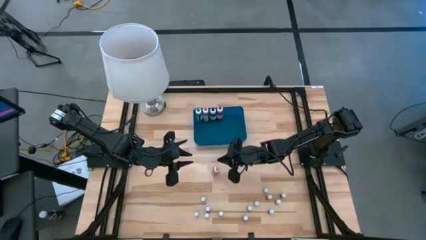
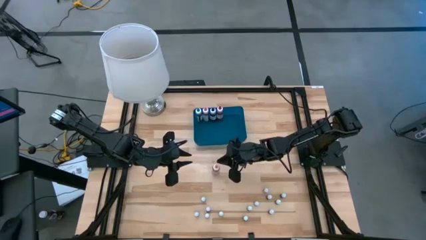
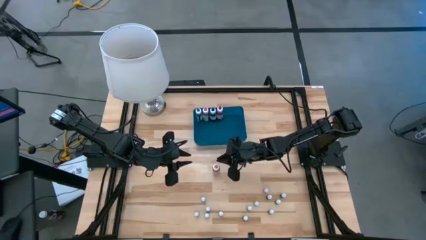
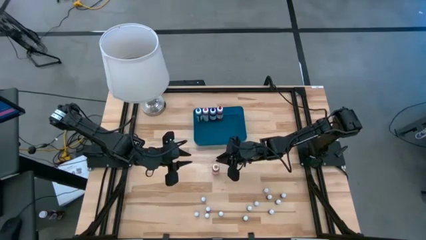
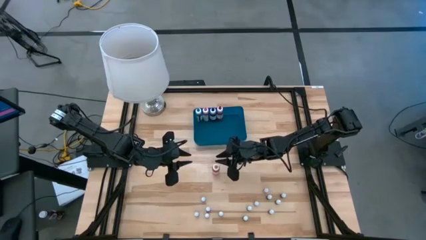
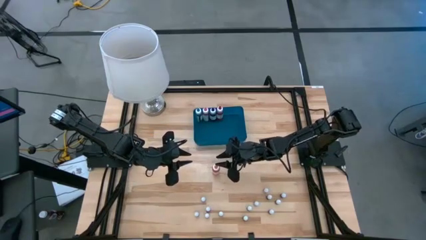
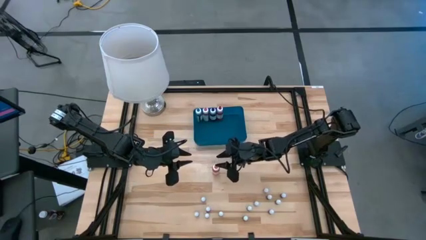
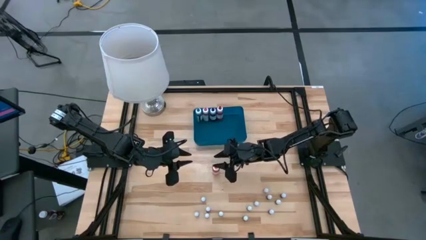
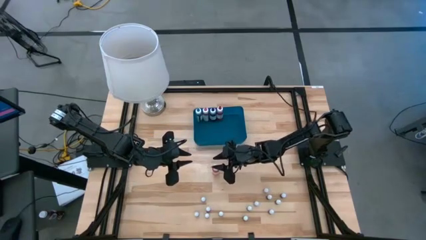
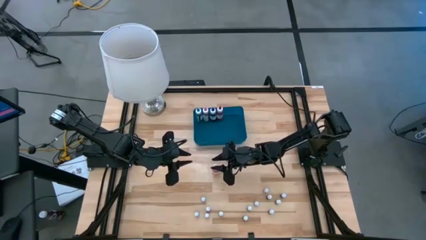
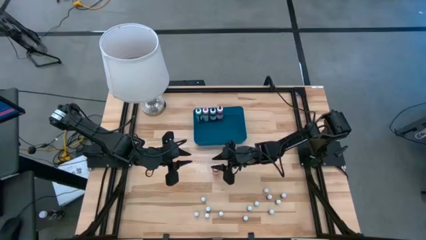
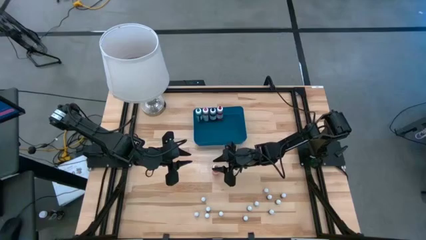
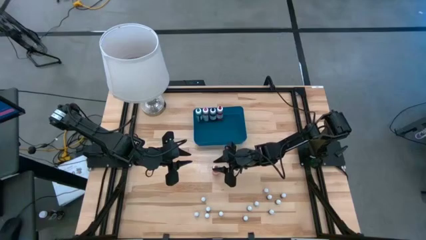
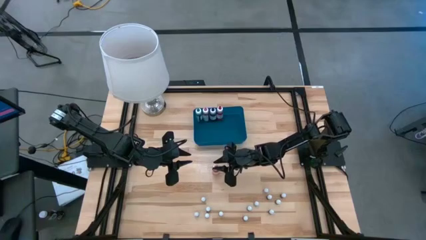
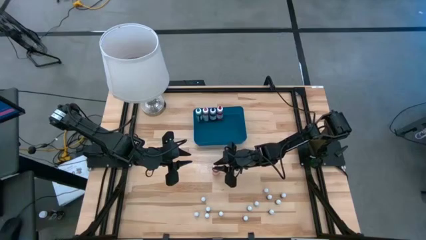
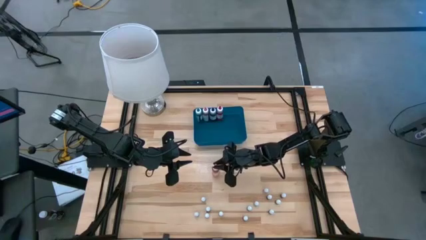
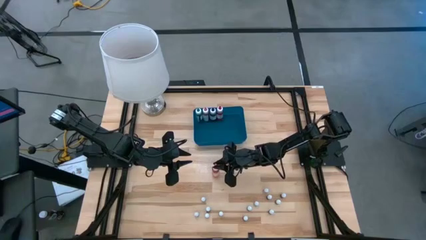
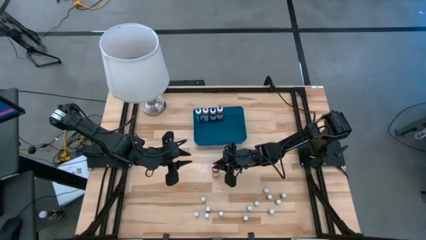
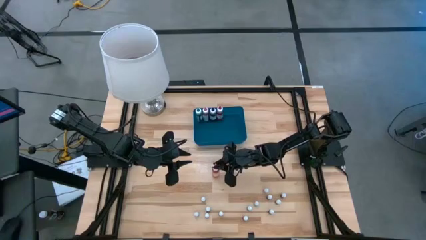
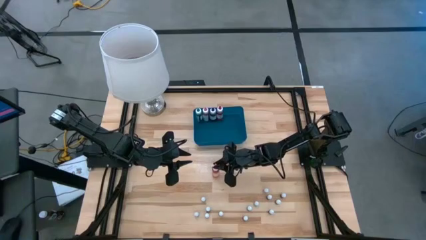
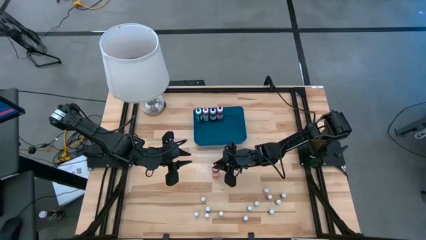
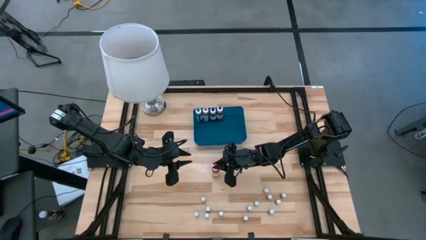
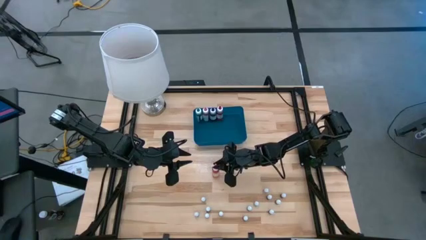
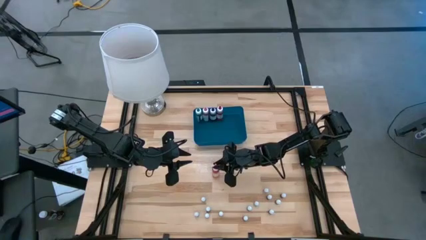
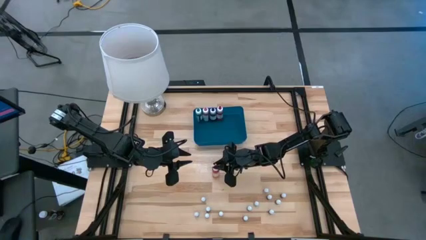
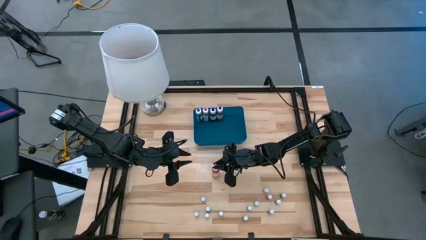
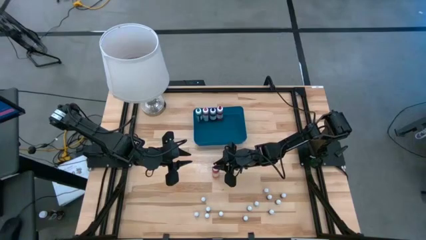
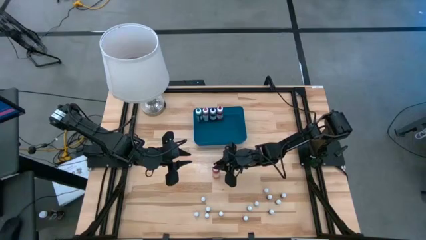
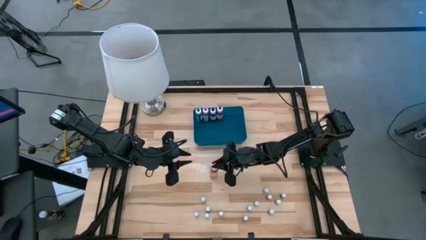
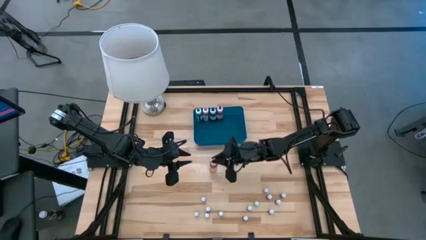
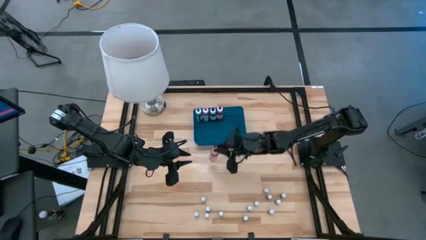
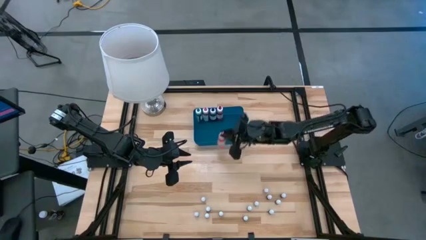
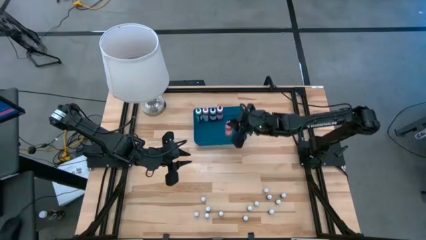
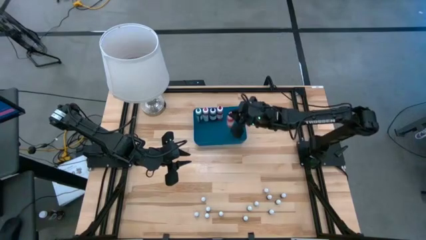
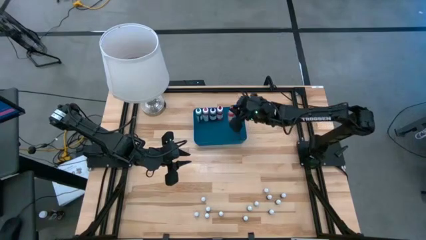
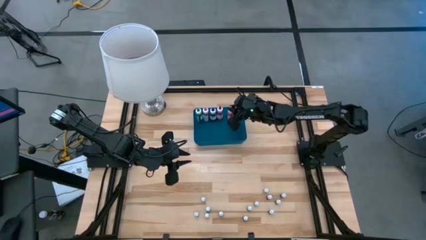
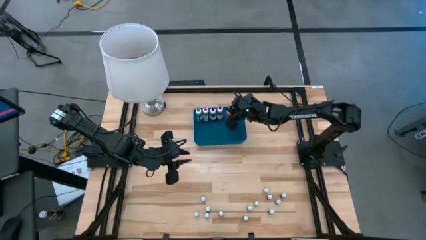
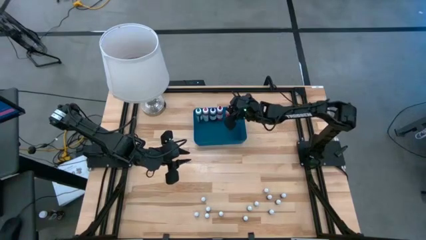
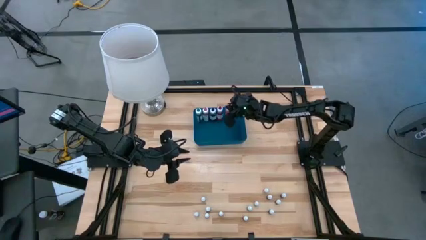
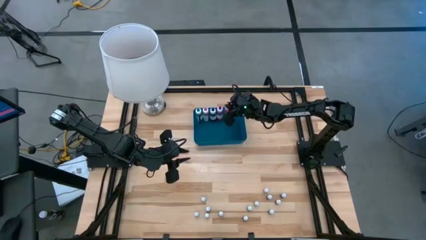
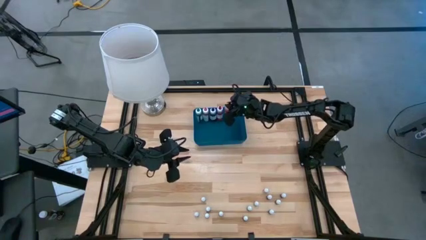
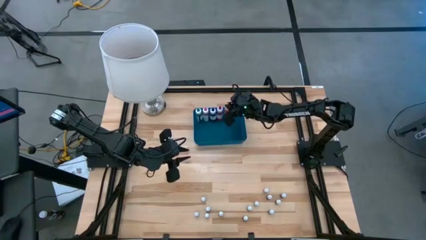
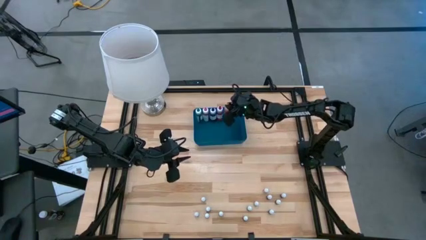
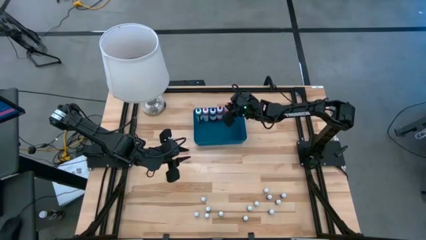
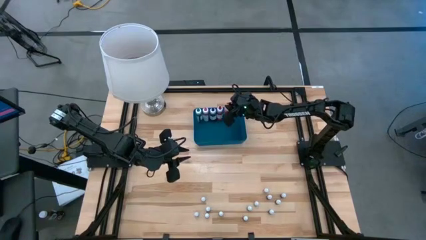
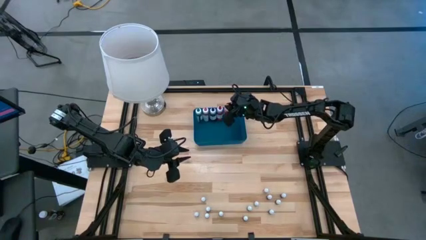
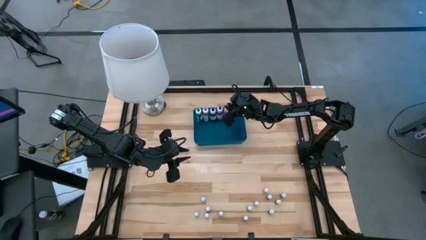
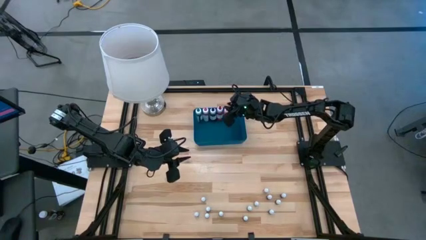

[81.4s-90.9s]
Task: Pick & Place food coloring
Put the large orange food coloring bottle into the bin

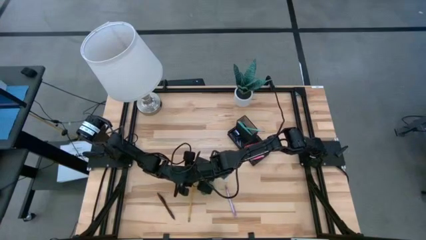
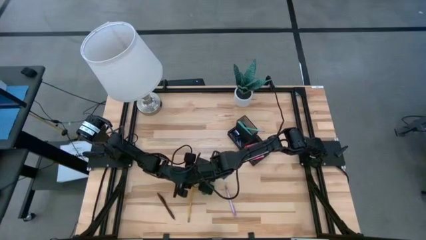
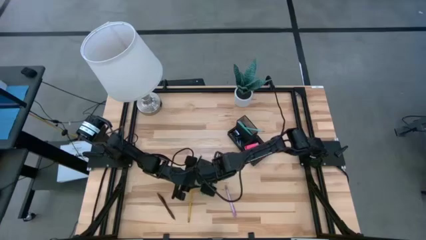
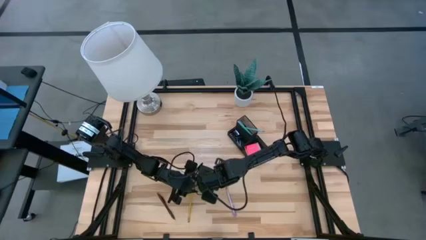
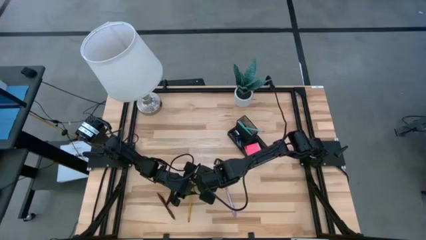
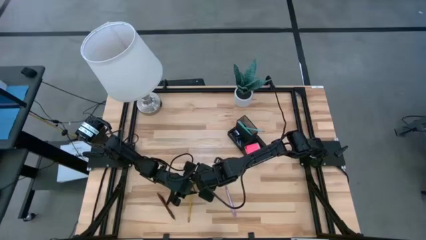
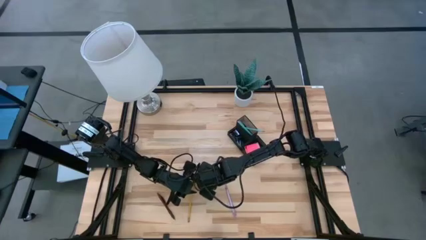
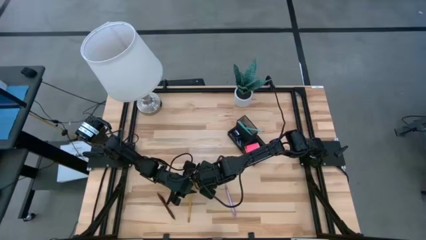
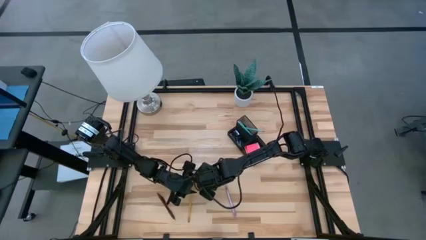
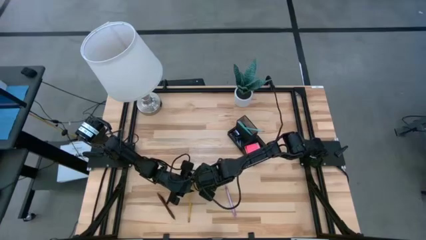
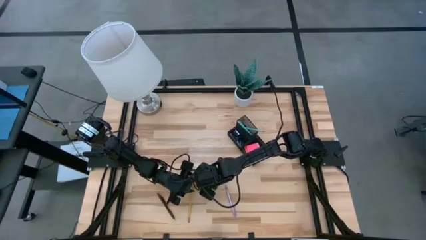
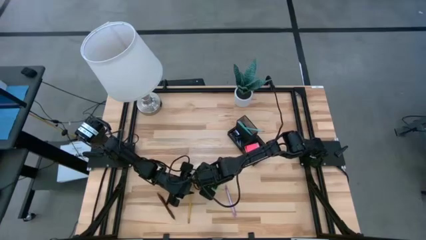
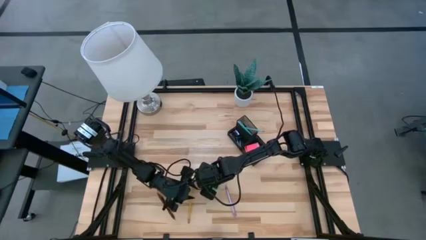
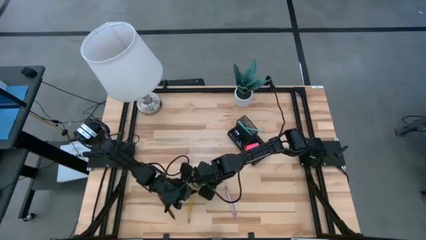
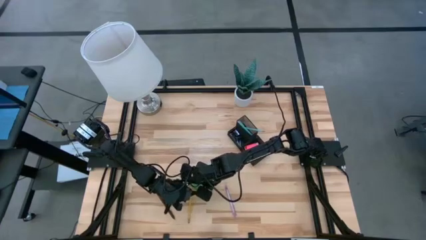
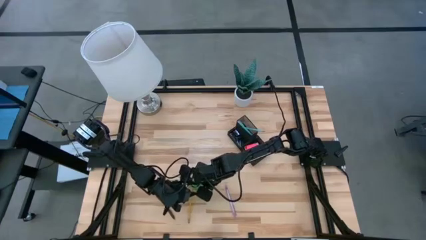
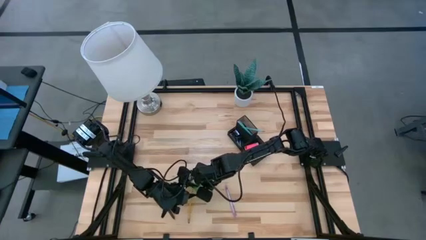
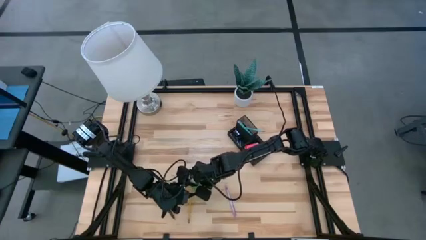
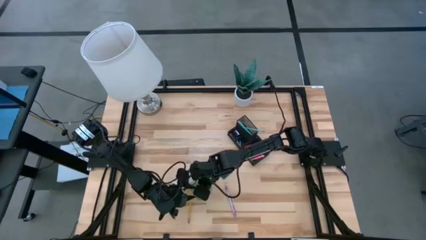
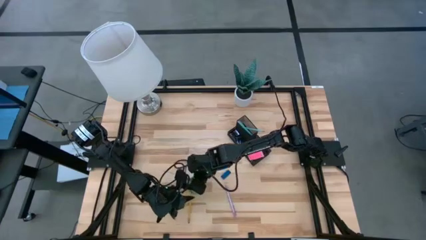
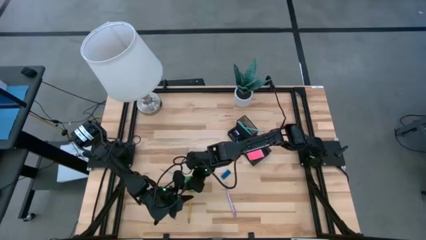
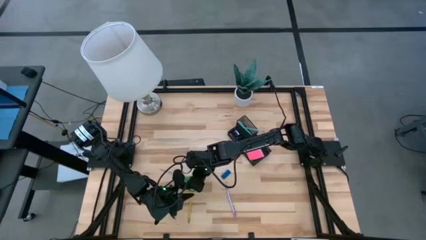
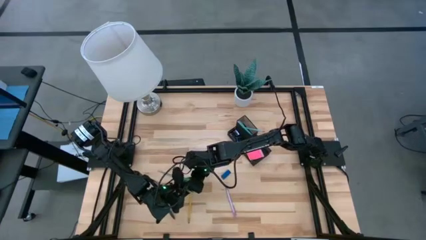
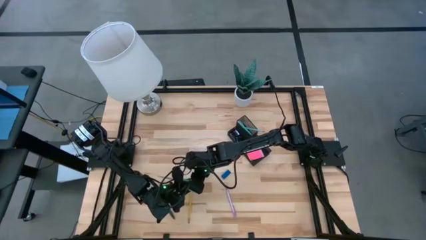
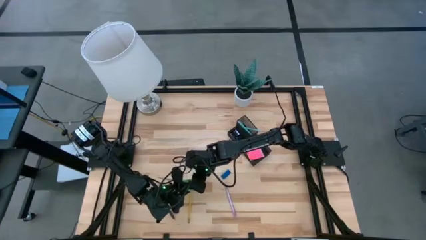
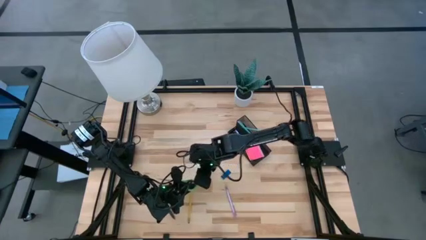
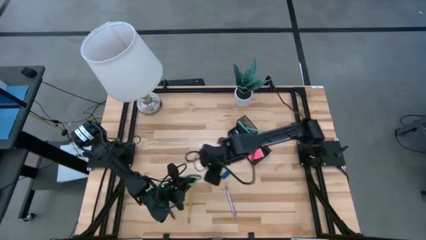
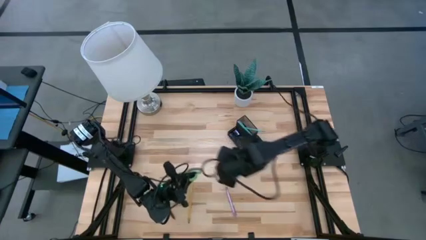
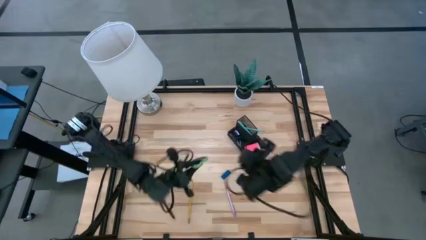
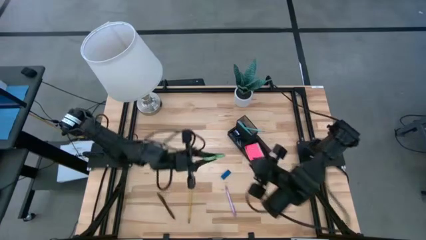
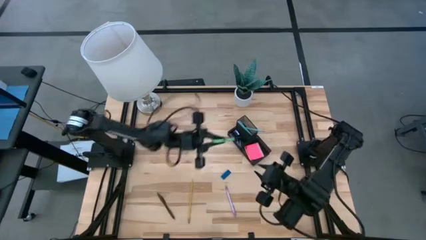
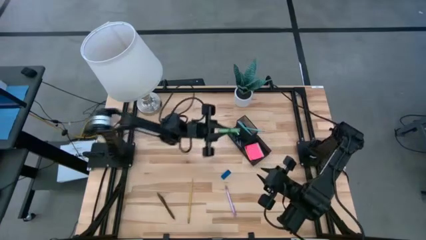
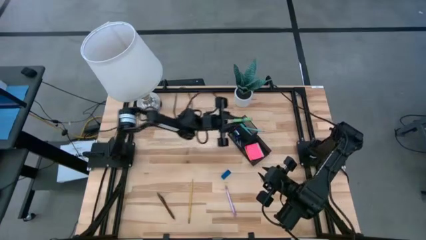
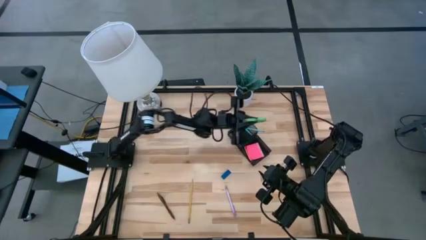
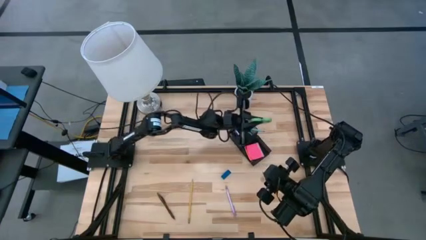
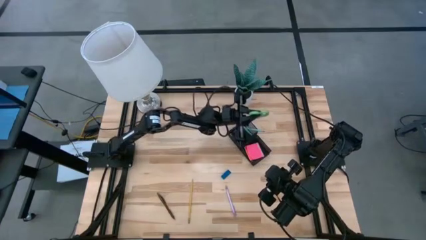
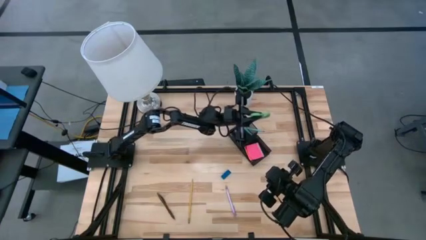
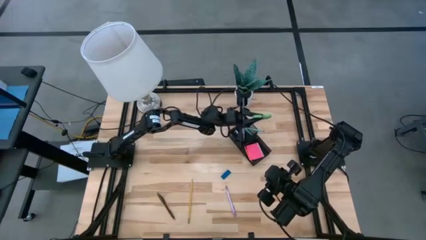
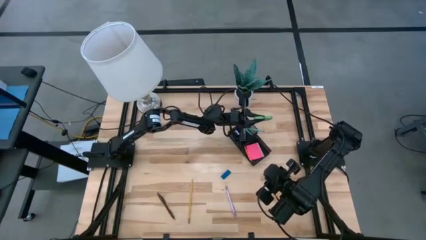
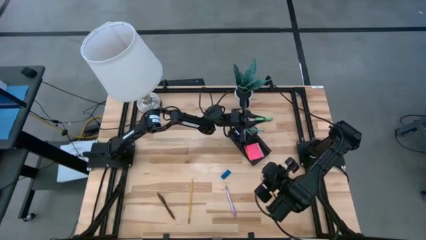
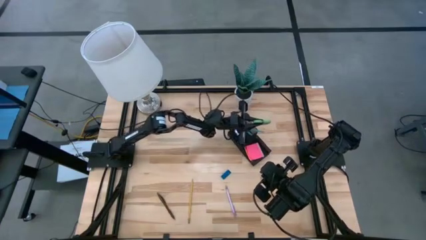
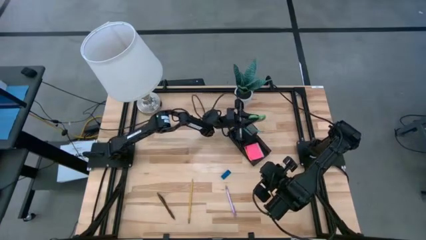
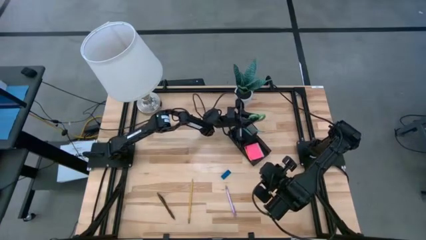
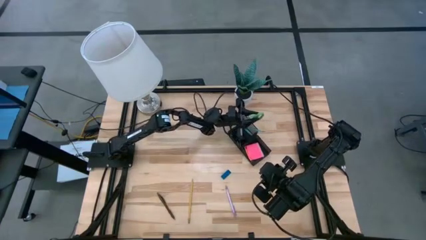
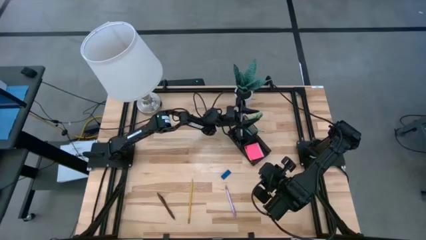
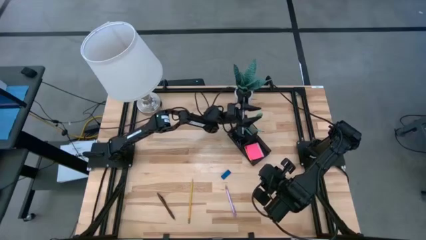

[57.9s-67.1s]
Task: Pick and place office supplies into organizer
Put the green scissors into the desk organizer
